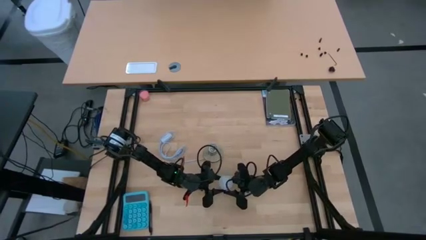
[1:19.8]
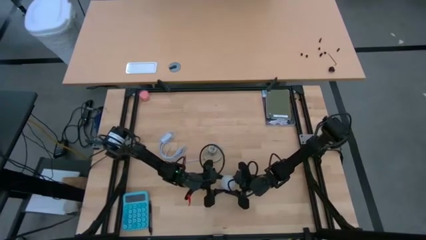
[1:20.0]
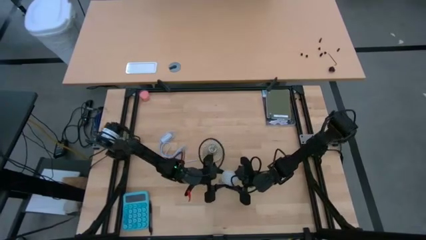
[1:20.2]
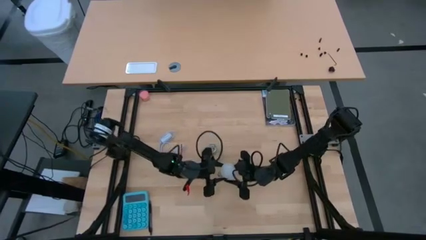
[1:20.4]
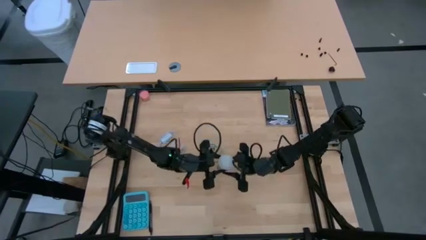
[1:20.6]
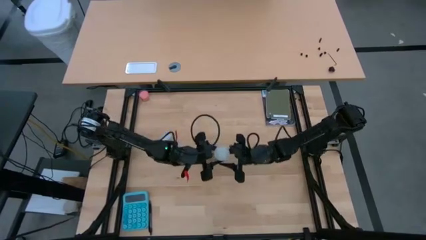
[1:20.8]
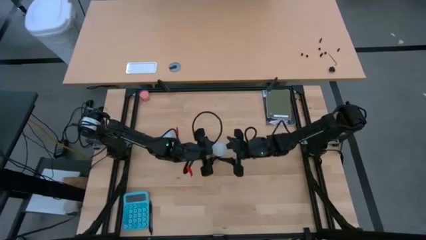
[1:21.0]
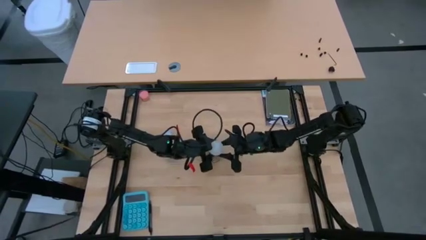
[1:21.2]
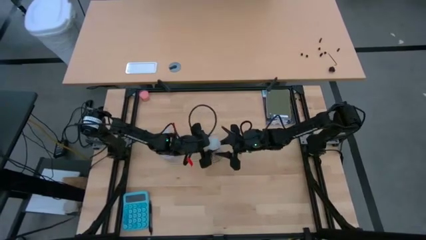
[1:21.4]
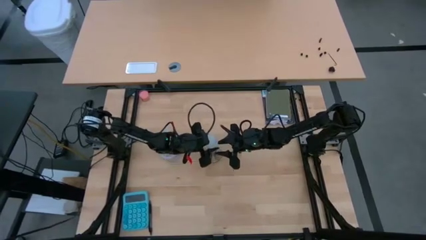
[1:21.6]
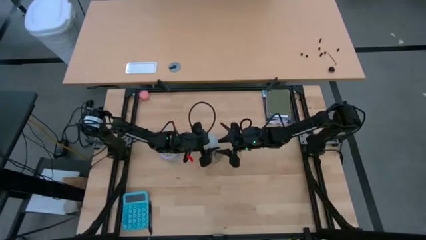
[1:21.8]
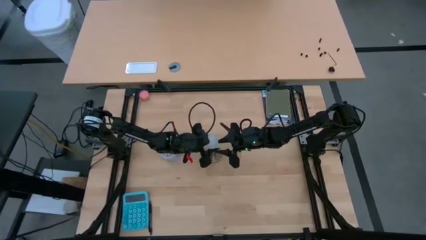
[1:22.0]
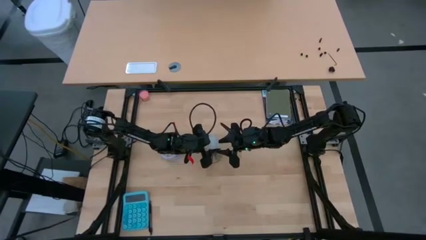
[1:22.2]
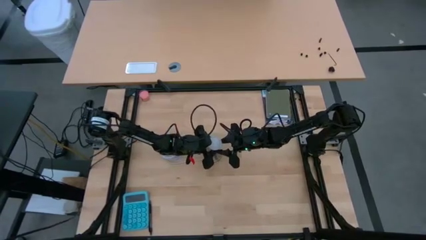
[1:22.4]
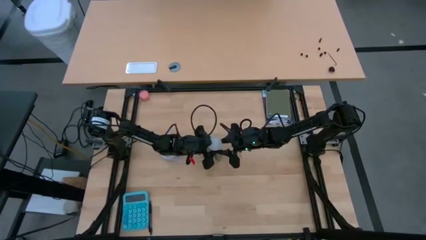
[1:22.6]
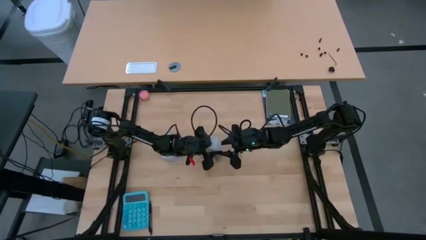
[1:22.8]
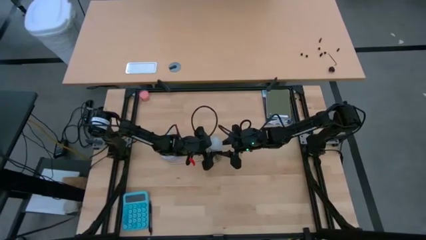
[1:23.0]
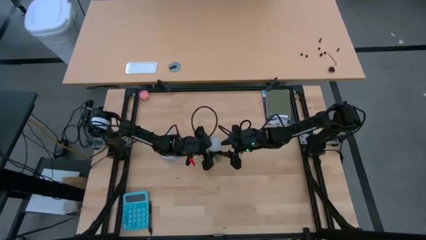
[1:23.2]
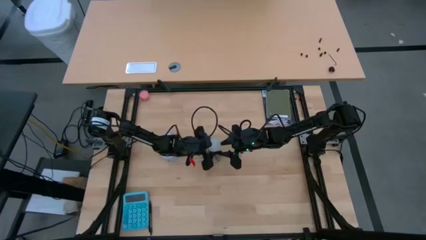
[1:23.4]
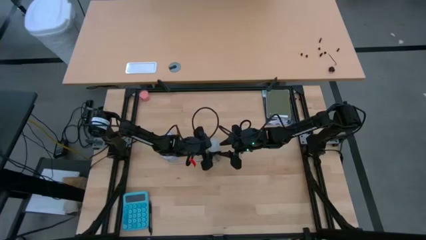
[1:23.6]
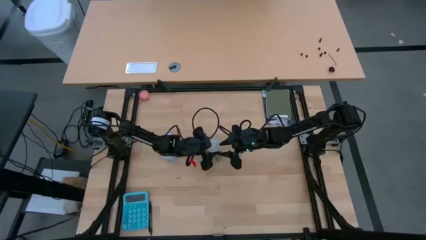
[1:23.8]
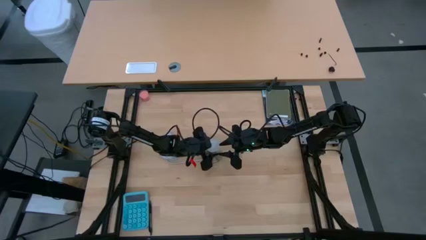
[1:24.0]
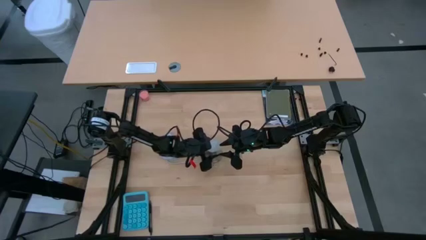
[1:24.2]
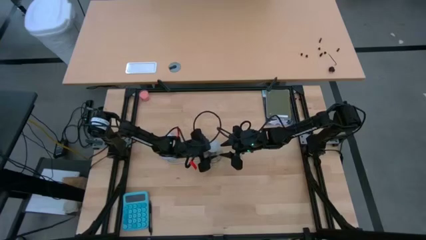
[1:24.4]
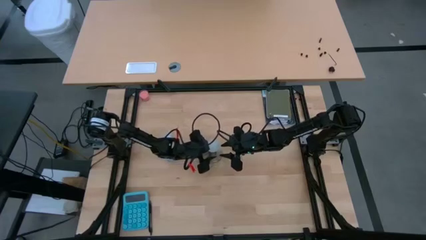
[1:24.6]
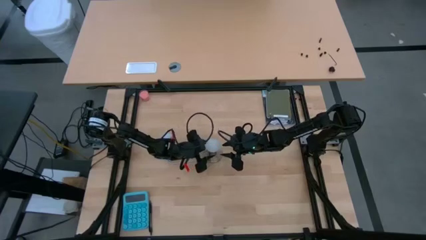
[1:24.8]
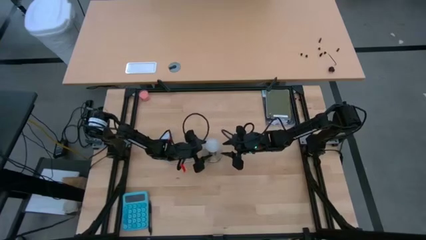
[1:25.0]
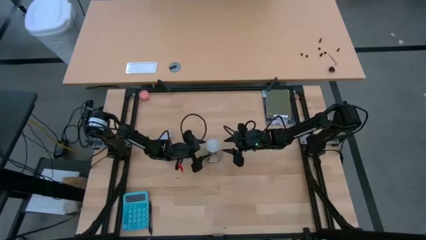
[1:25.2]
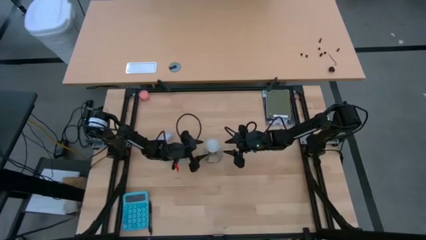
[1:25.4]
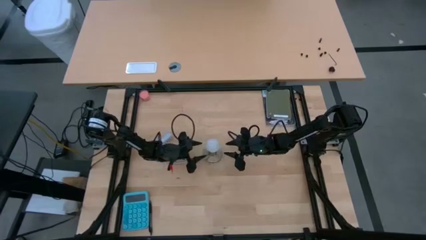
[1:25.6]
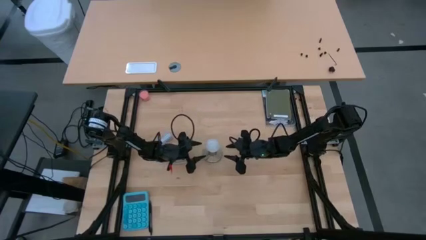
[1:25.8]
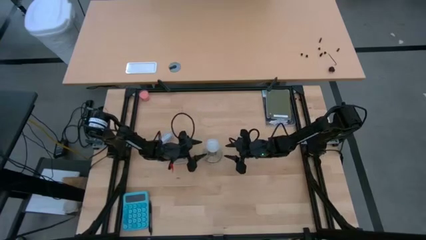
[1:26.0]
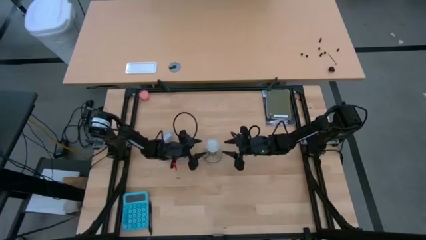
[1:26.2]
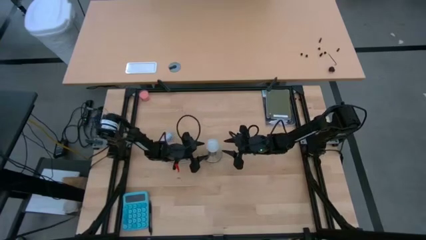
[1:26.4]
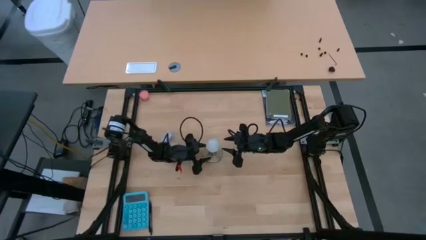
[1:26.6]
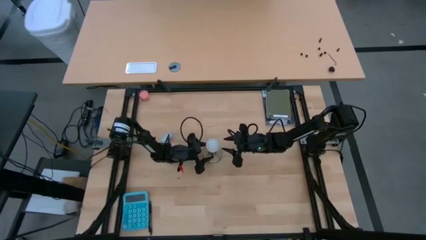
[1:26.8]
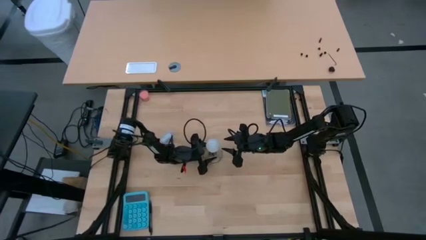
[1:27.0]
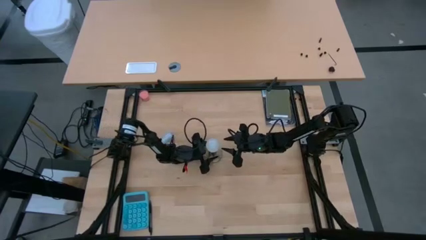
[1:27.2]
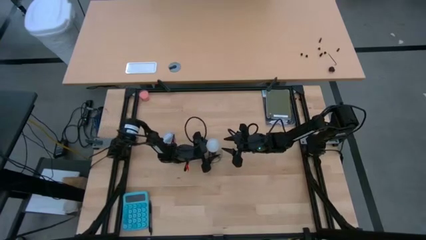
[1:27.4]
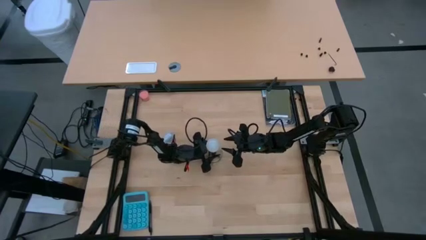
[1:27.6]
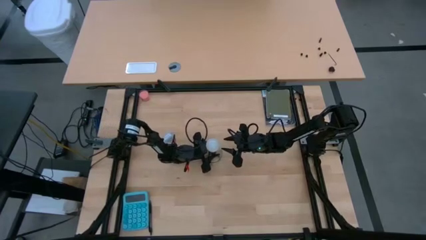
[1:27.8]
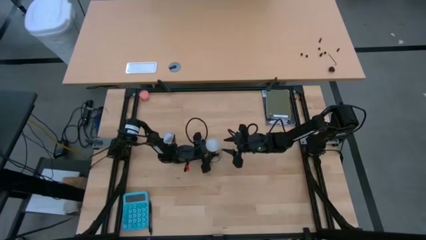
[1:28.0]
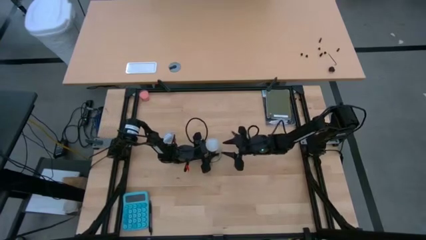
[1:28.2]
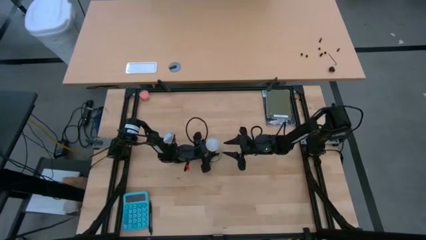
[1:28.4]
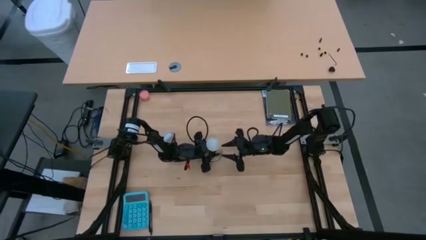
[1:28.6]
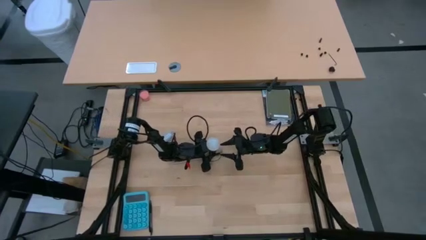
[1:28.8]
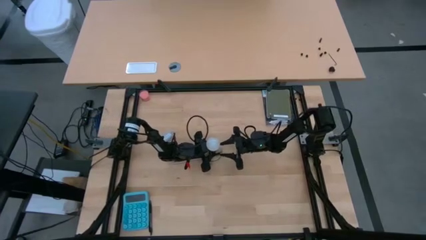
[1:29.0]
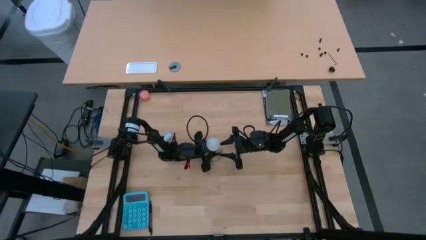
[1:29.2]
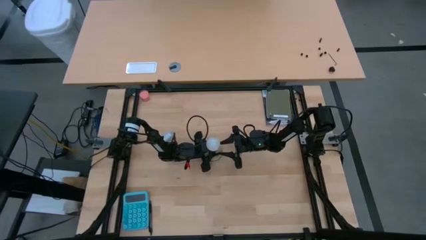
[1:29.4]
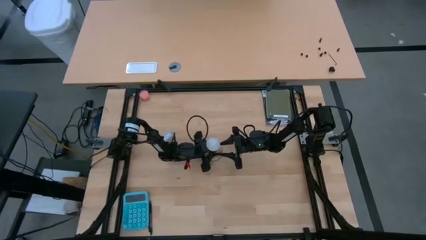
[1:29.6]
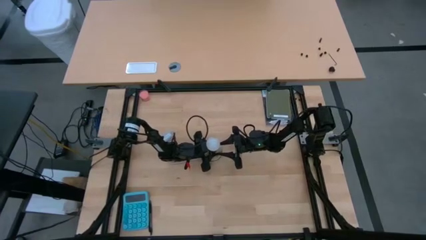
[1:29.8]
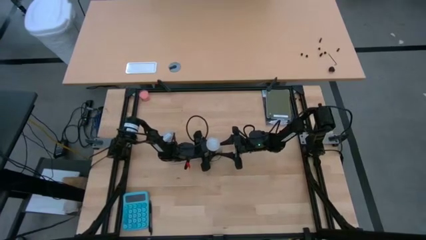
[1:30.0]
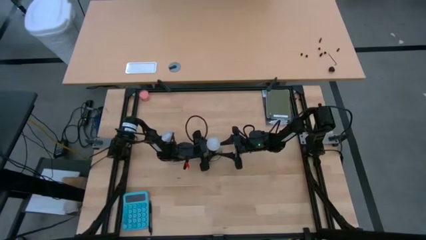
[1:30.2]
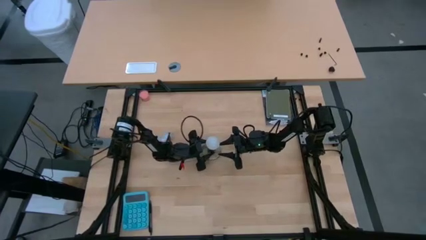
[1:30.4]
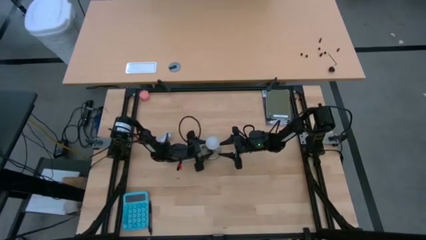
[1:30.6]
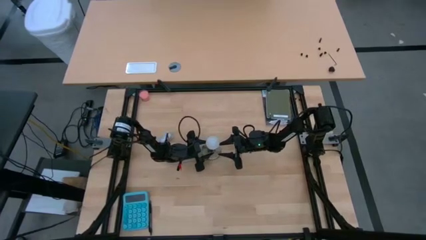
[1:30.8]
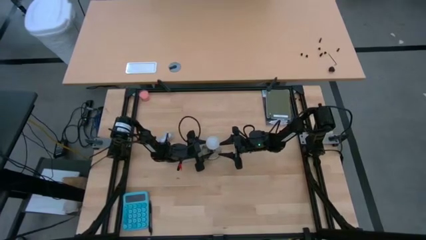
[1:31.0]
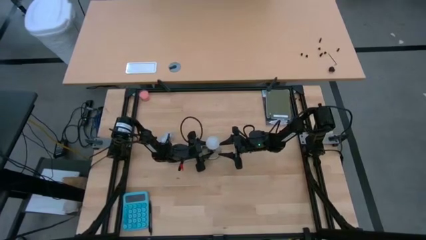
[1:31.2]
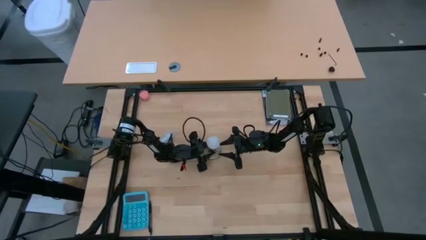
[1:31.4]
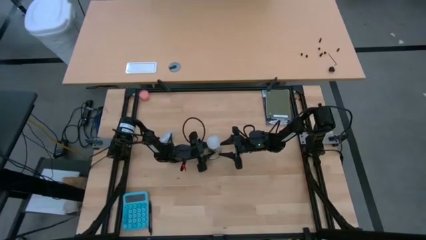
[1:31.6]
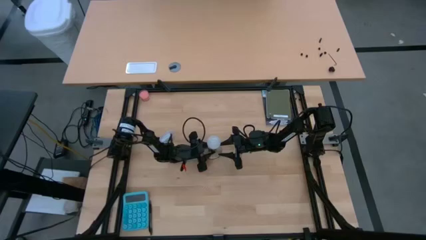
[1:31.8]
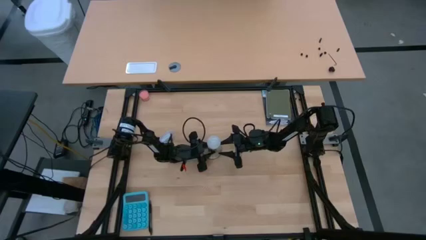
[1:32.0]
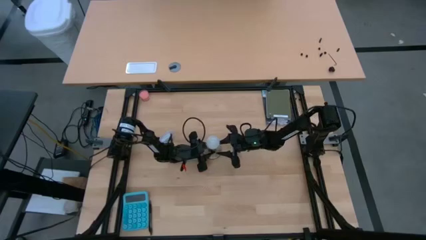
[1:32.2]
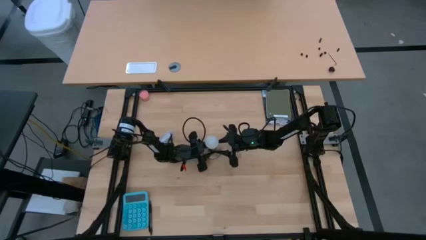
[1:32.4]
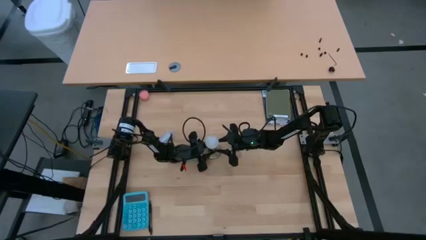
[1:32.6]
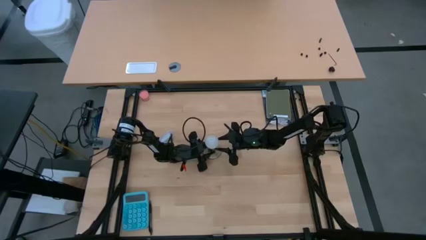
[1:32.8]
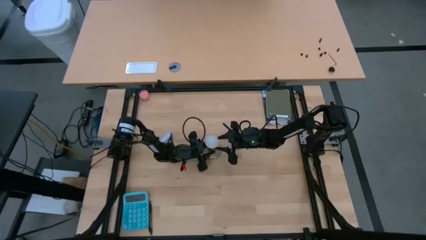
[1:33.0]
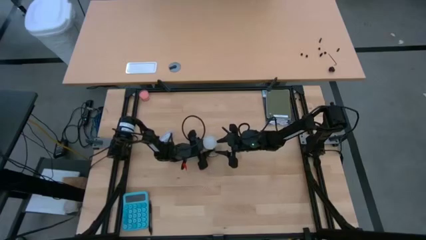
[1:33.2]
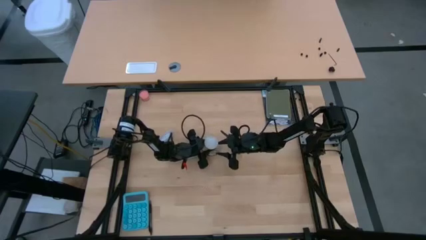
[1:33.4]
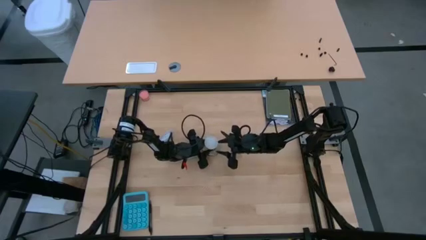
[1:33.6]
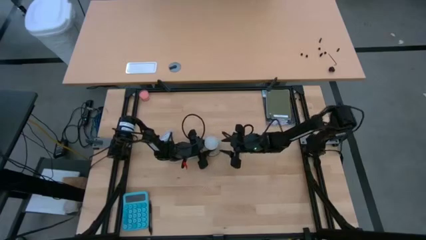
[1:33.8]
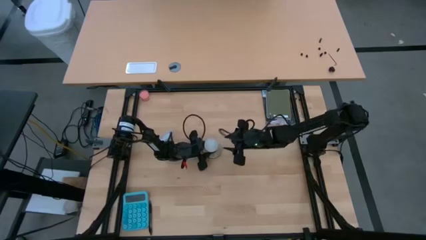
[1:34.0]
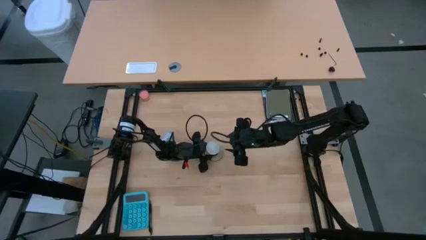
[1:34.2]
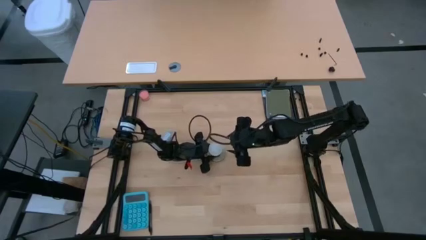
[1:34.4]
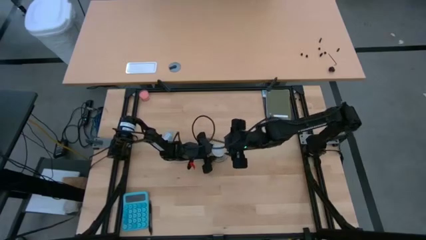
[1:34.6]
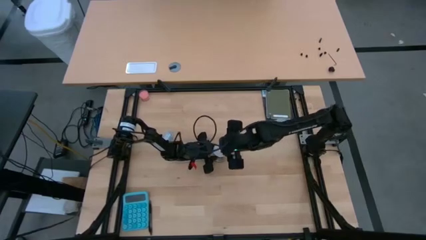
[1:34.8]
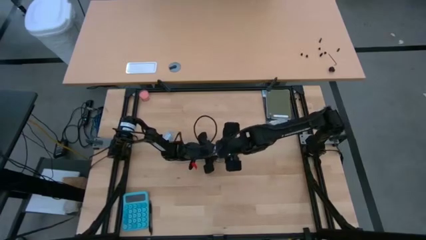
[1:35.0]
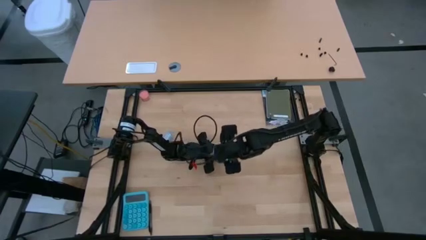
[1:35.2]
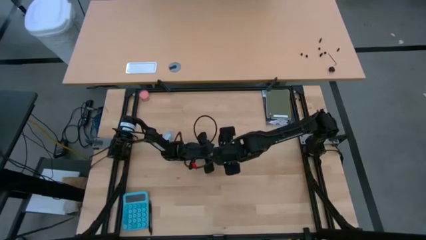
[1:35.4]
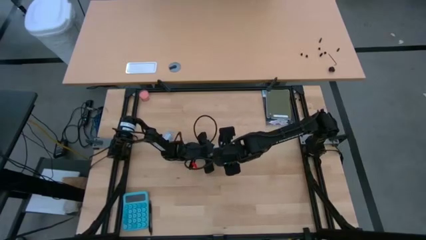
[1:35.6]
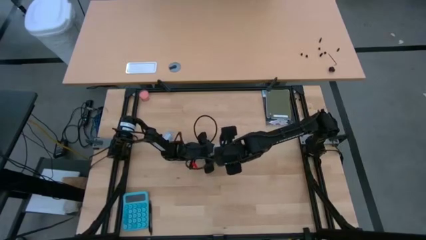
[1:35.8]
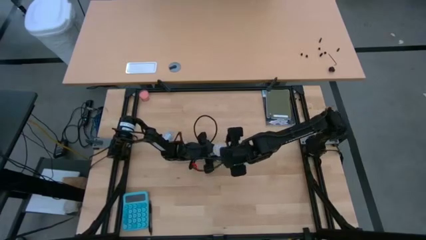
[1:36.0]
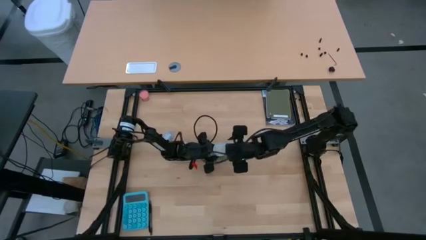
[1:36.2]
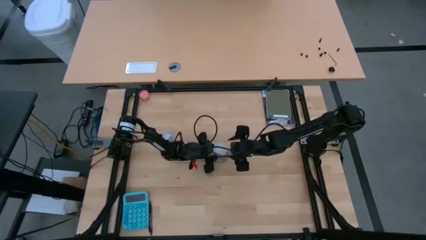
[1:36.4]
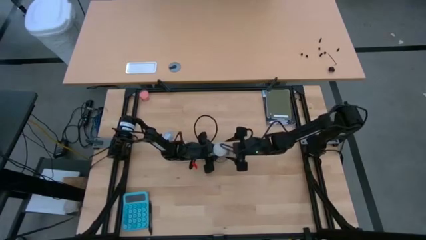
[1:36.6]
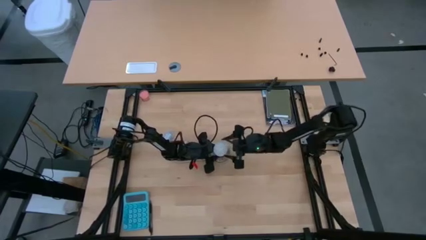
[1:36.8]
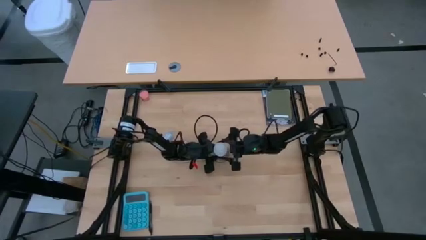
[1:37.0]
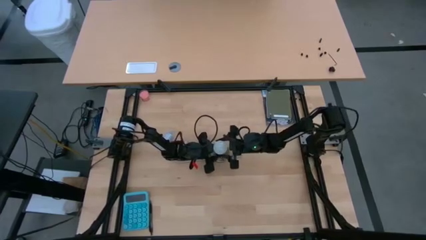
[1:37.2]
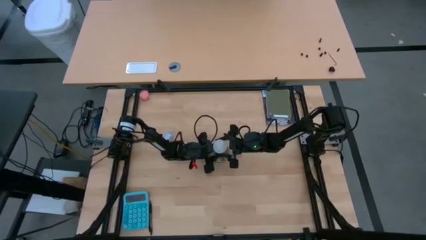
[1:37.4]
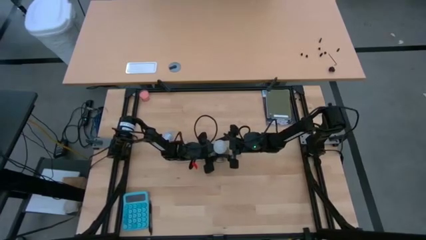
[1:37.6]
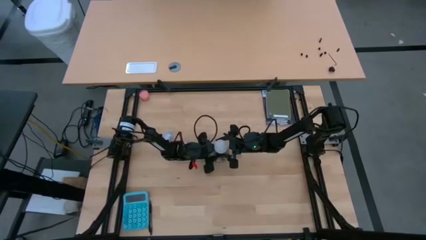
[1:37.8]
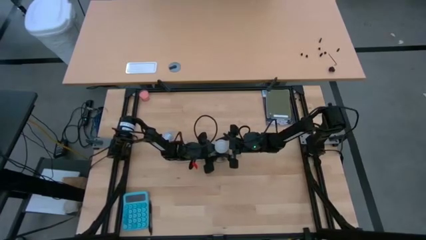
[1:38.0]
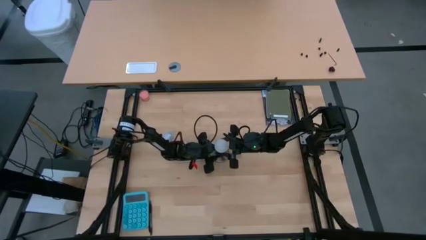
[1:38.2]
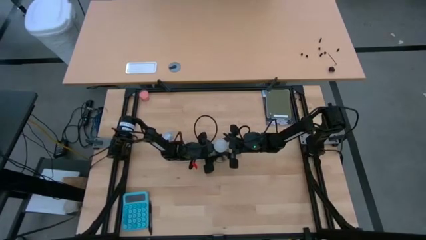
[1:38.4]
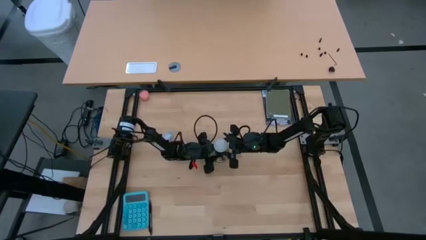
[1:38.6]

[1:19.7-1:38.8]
Task: Screw lightbulb
Insert the lightbulb into the lamp holder
